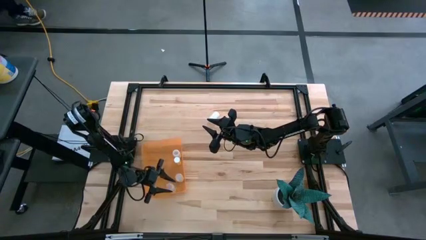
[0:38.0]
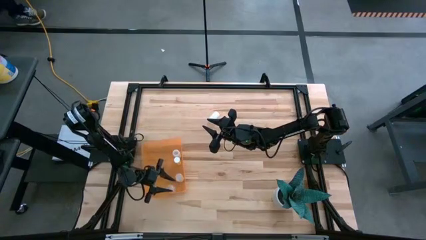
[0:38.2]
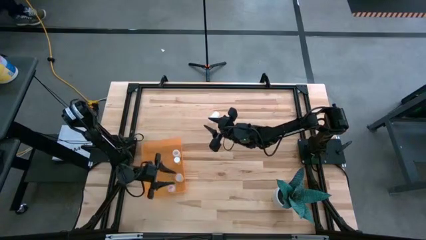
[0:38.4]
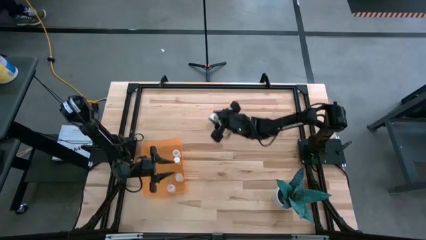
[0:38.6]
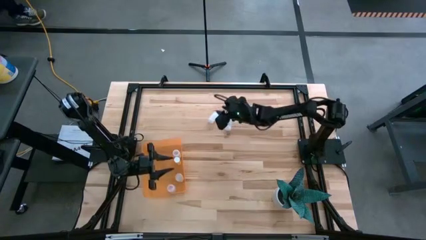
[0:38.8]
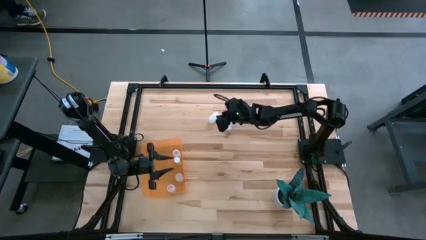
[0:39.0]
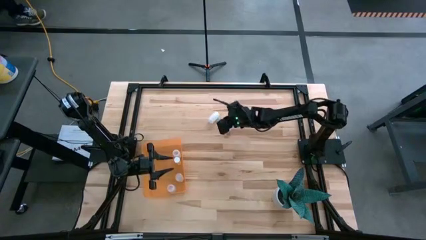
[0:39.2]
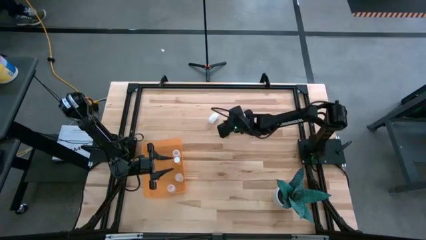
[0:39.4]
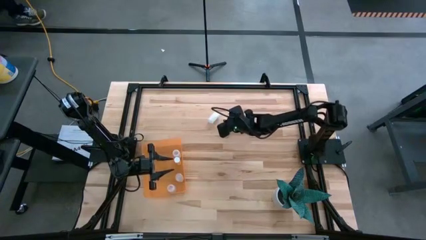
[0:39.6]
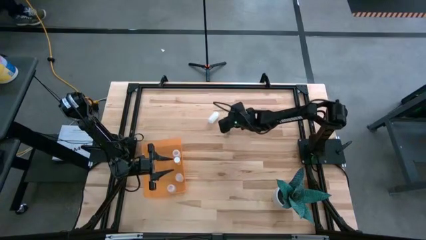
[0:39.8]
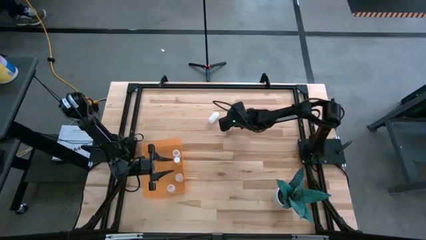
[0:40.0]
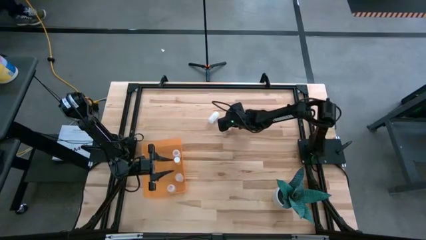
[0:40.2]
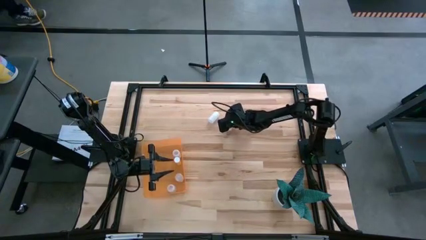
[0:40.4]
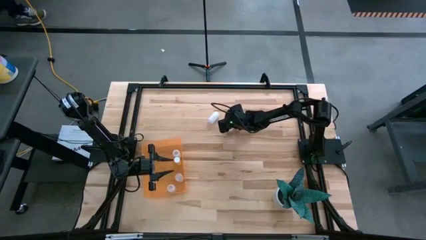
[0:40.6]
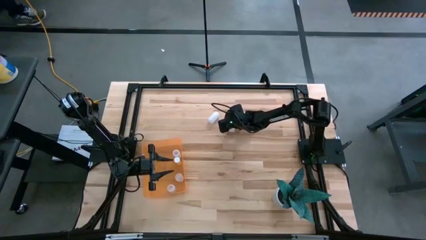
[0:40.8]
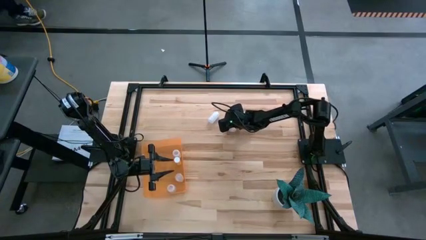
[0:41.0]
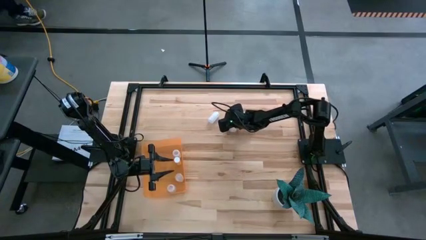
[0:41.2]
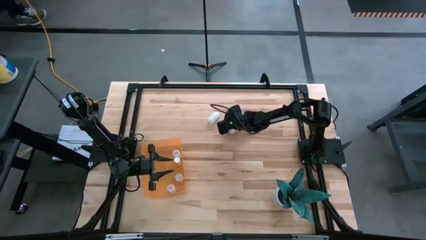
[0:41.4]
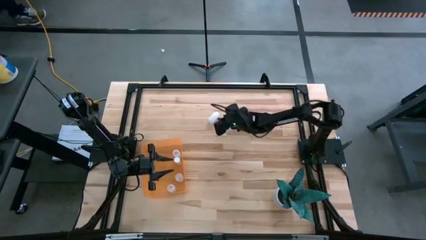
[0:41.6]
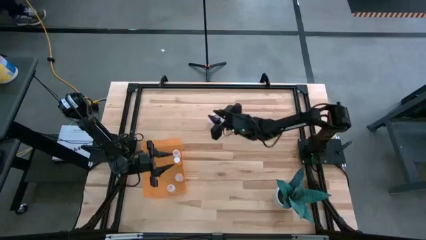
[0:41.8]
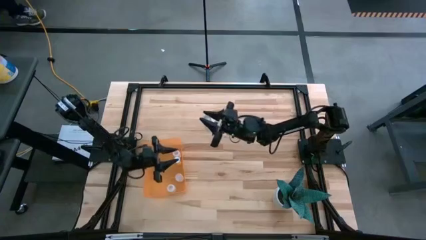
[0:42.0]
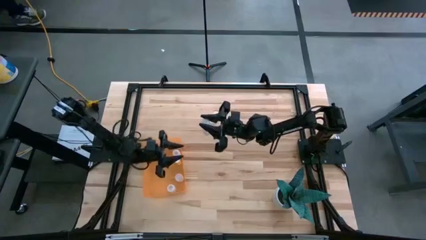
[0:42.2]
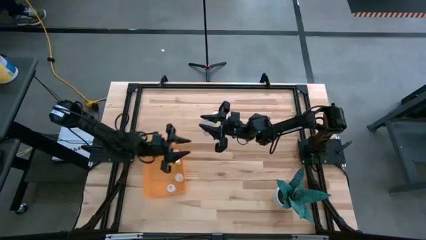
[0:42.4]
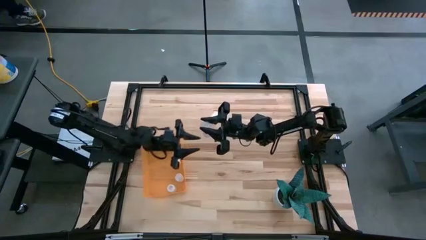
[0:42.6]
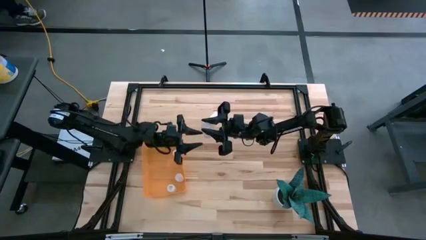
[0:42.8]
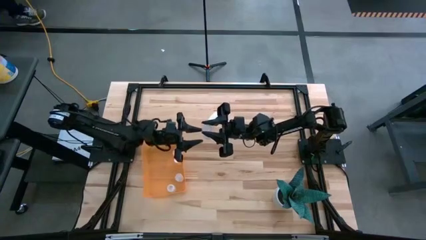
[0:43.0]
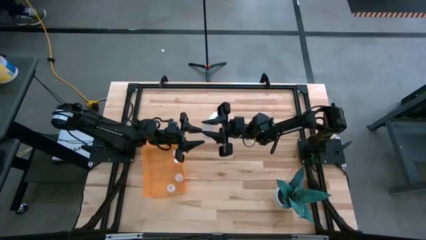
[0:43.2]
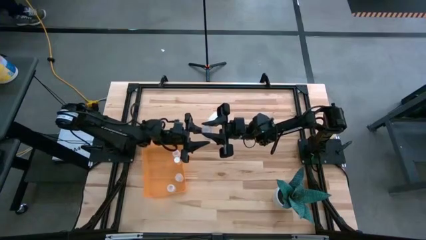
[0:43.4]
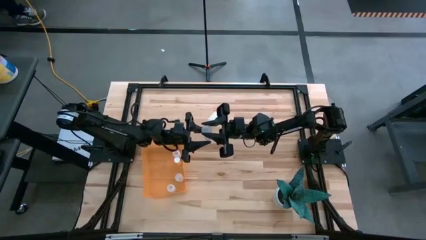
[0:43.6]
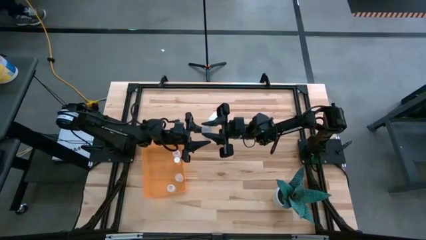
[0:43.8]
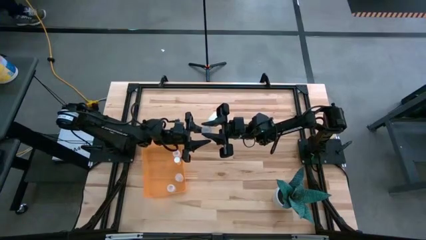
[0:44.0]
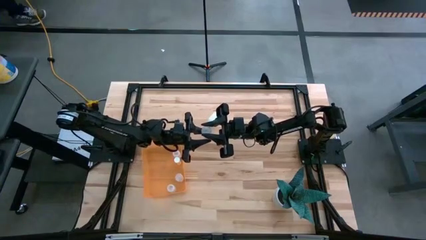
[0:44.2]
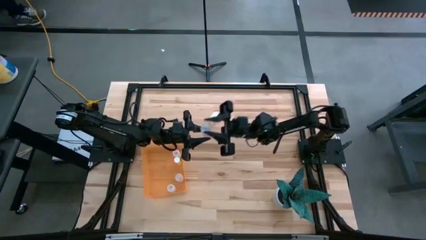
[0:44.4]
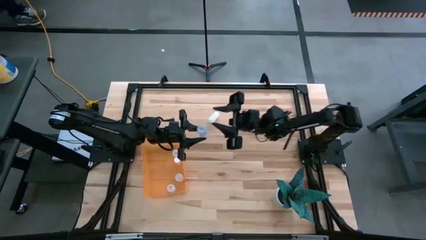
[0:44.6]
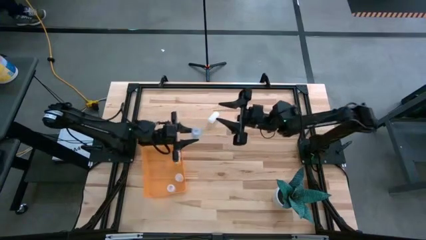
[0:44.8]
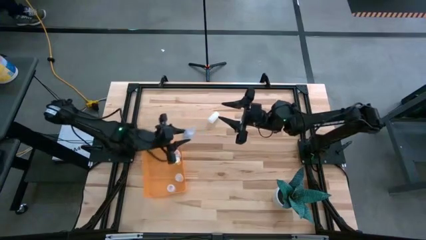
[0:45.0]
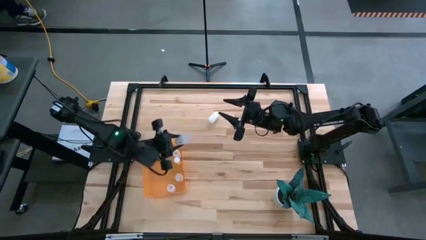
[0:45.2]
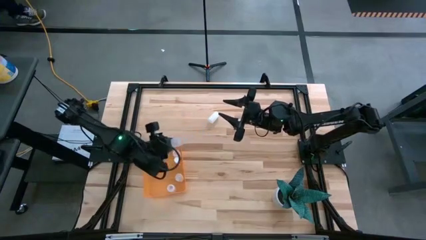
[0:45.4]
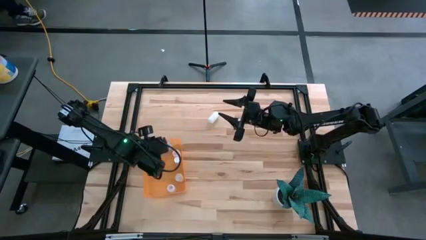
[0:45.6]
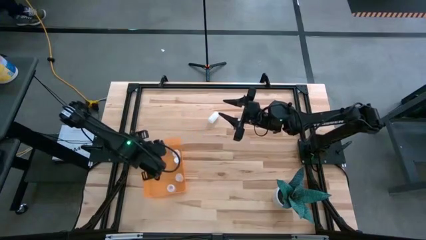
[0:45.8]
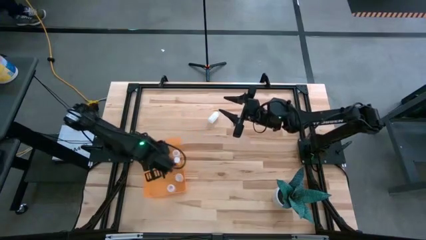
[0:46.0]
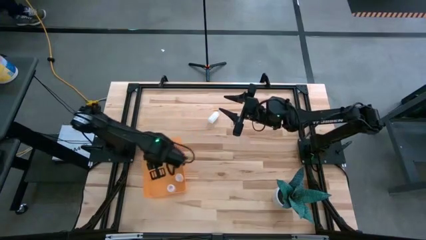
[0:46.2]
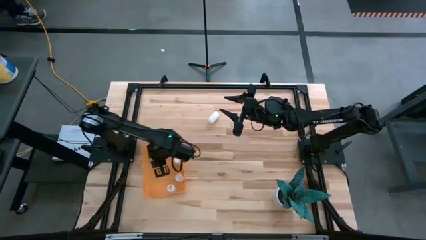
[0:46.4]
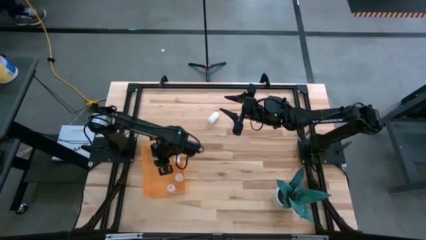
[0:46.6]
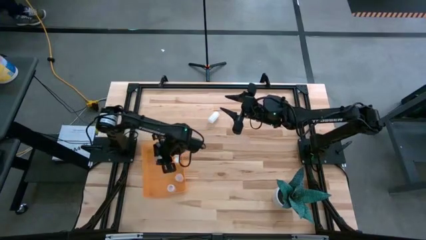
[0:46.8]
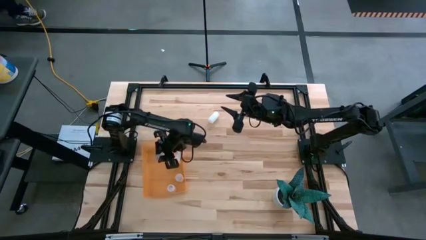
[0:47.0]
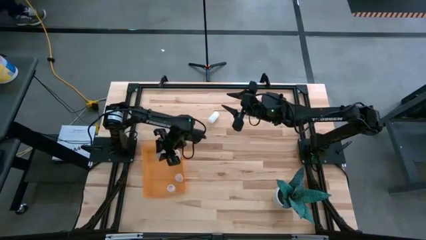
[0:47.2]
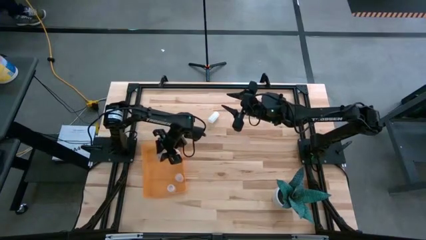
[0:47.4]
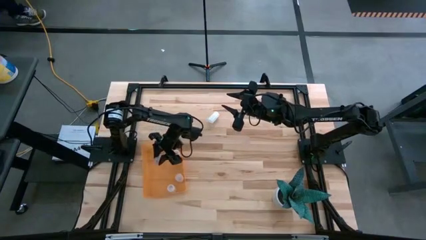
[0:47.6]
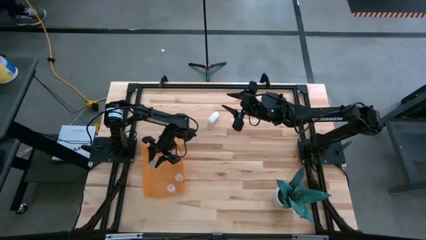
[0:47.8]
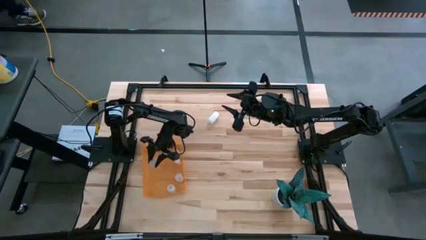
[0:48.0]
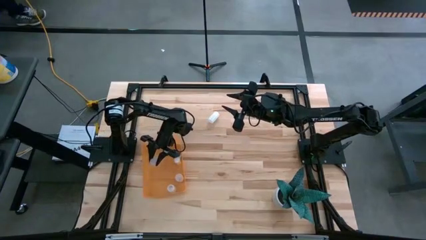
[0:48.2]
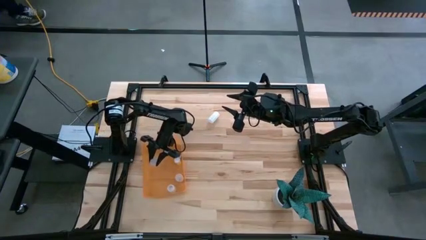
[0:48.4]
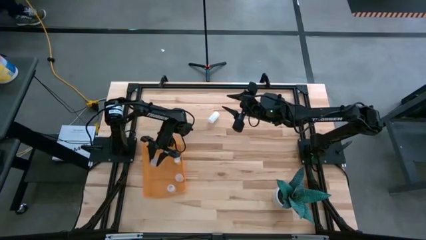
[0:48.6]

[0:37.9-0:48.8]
Task: Pick and place pill bottles into a basket
Put the transparent pill bottle into the orange bin

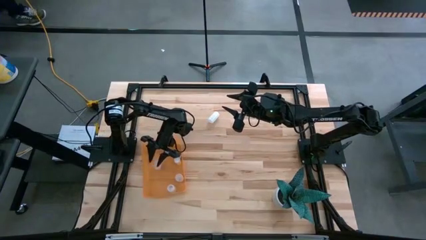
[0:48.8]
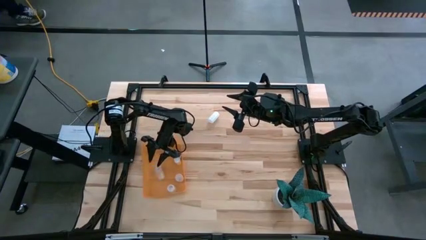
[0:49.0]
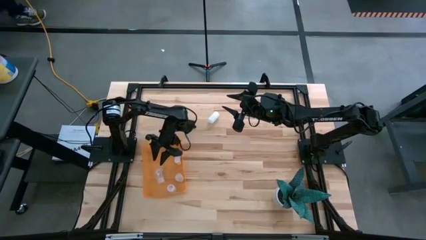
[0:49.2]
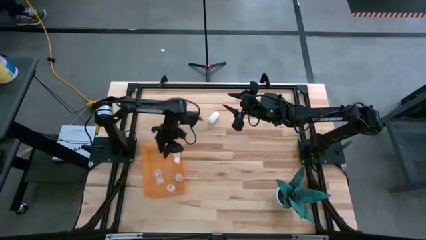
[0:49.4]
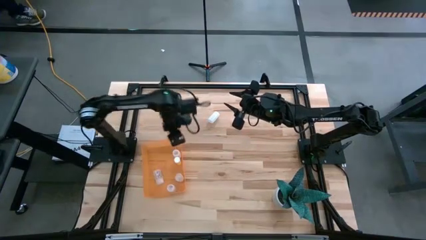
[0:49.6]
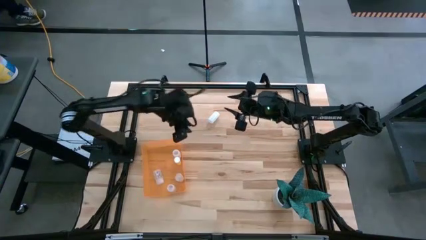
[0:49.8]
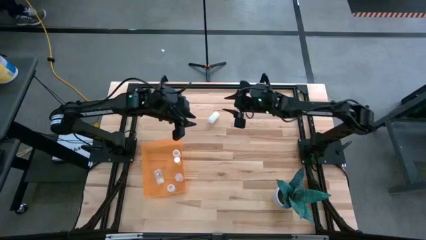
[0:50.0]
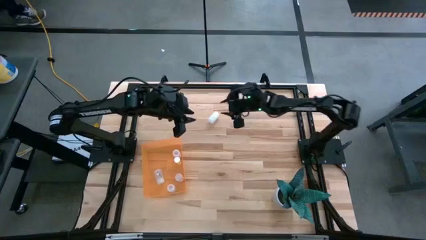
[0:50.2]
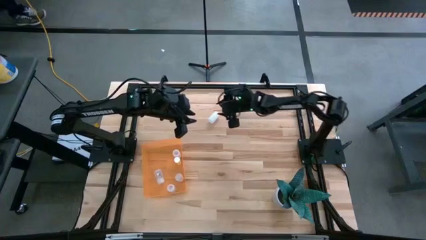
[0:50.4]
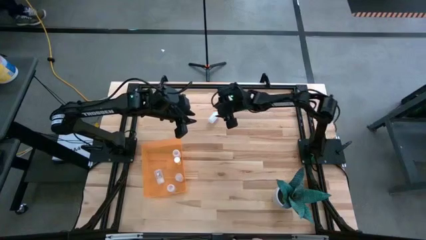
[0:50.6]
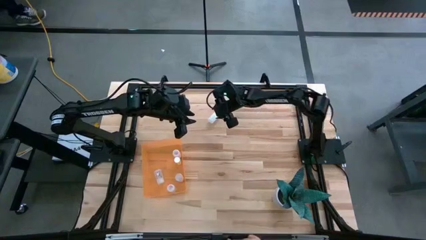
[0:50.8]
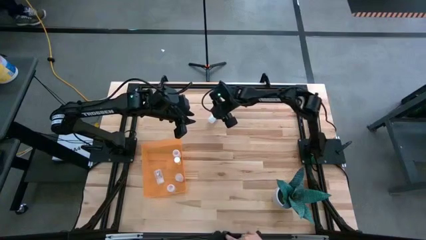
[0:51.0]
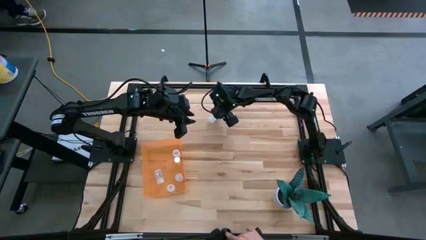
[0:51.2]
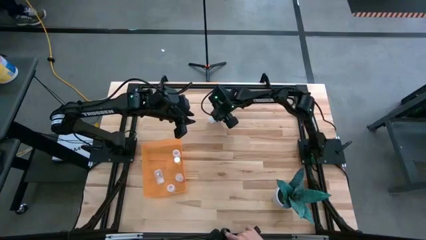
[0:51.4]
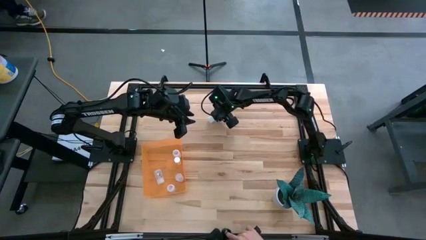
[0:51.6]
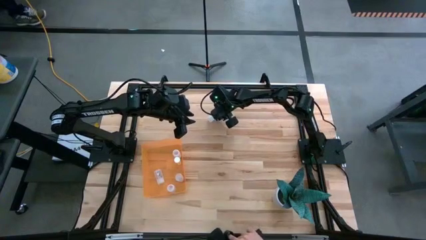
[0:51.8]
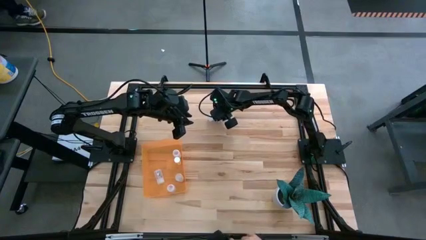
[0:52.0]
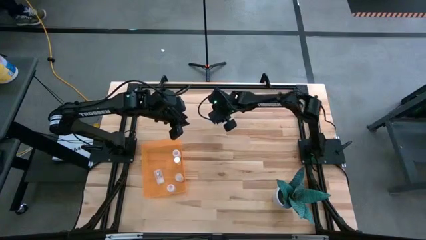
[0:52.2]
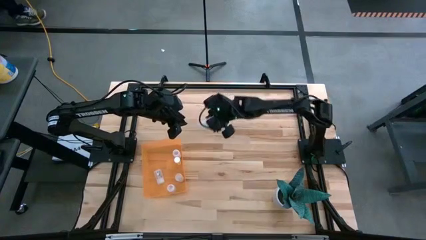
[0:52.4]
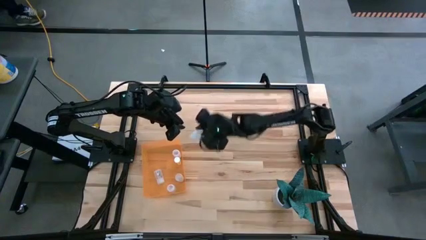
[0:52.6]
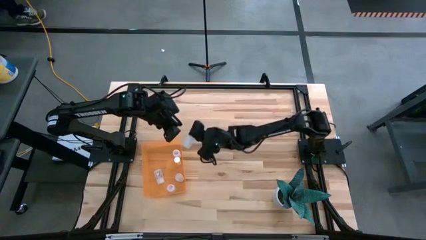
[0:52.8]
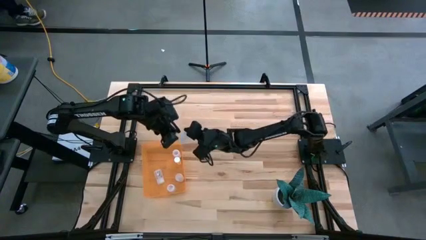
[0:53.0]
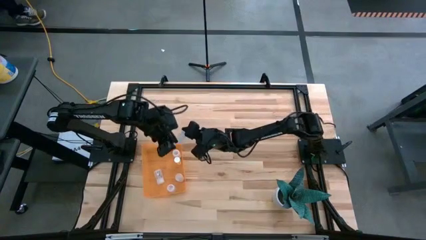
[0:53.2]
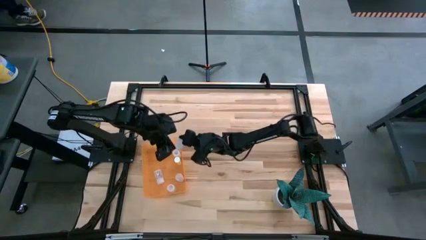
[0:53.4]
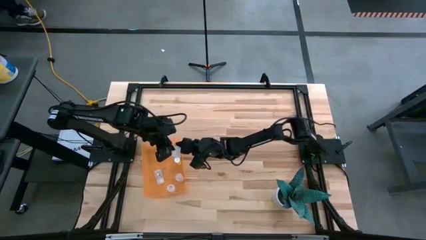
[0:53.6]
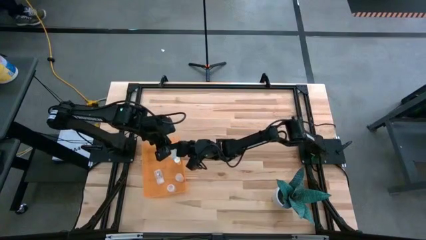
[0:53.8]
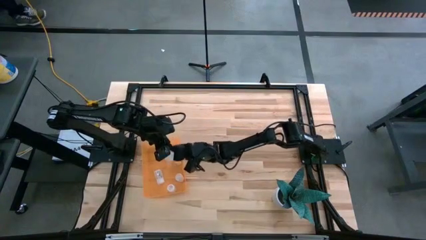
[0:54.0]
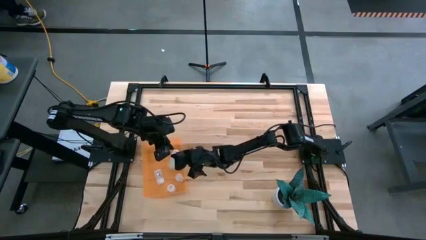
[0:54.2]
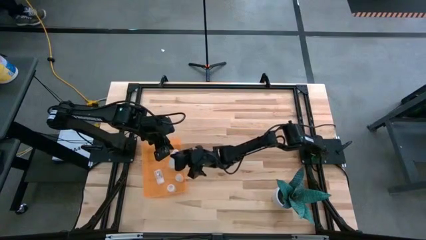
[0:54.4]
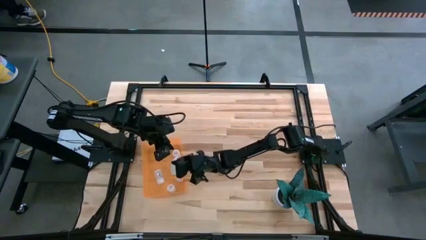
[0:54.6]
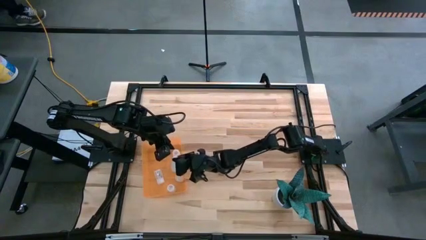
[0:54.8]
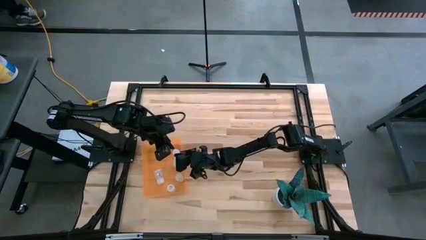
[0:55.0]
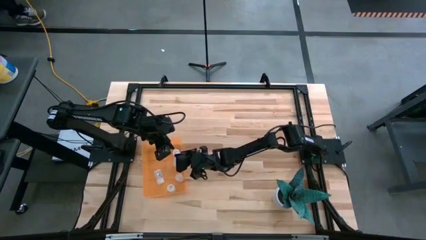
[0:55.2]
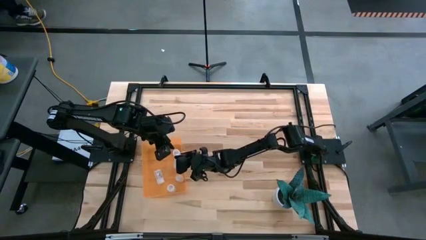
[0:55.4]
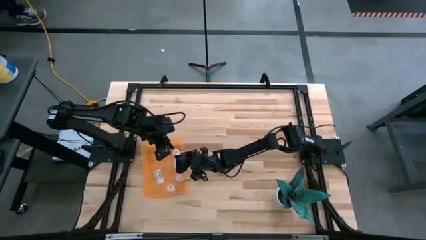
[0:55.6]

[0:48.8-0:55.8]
Put the white pill bottle into the orange bin
